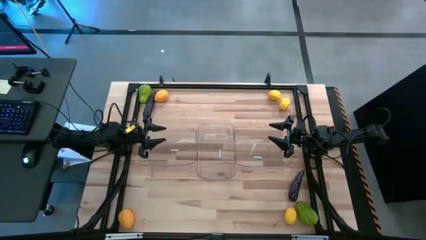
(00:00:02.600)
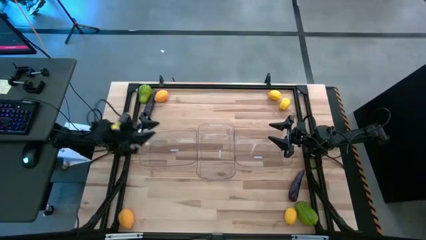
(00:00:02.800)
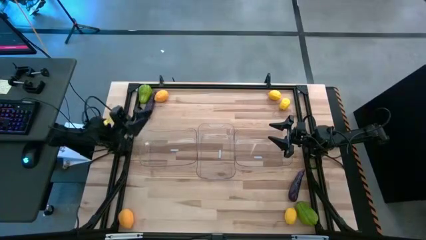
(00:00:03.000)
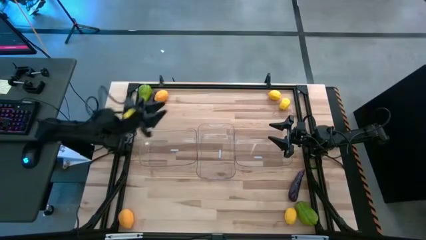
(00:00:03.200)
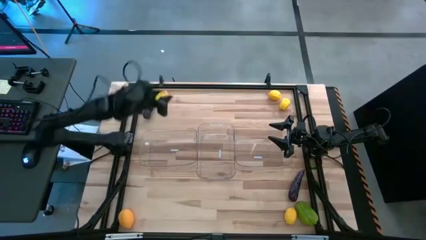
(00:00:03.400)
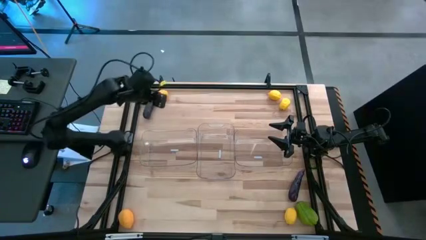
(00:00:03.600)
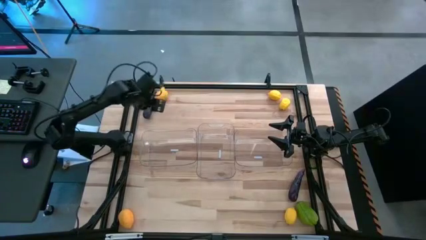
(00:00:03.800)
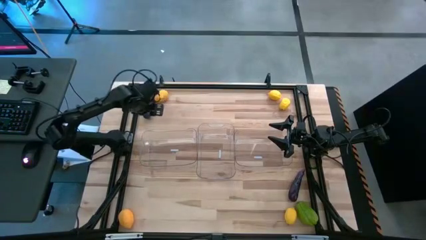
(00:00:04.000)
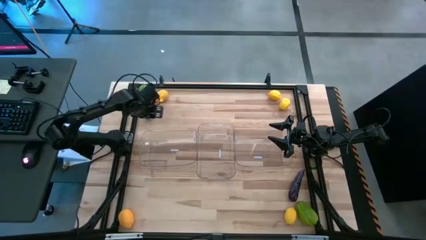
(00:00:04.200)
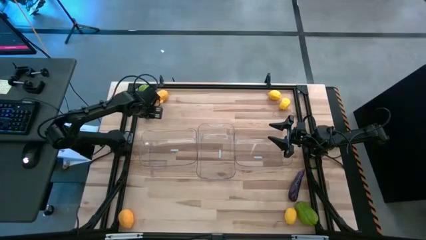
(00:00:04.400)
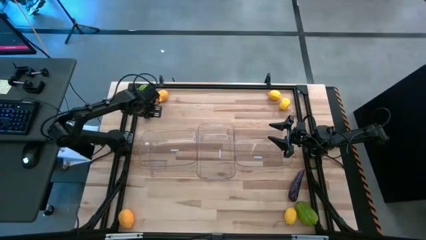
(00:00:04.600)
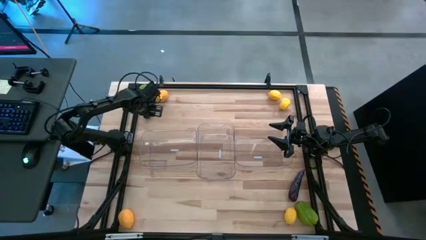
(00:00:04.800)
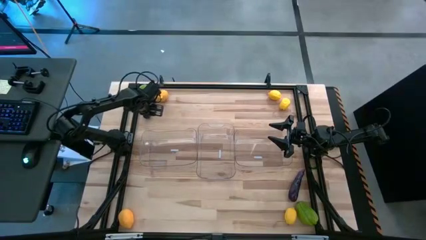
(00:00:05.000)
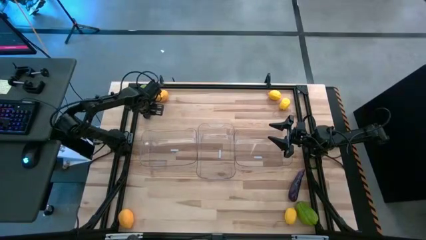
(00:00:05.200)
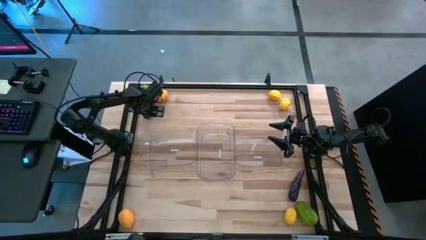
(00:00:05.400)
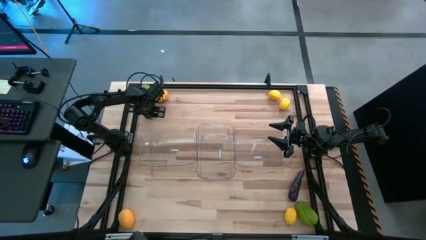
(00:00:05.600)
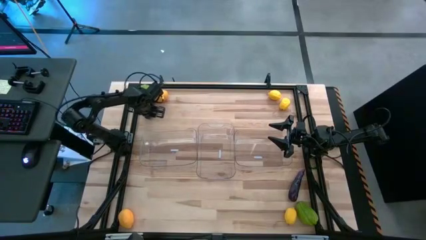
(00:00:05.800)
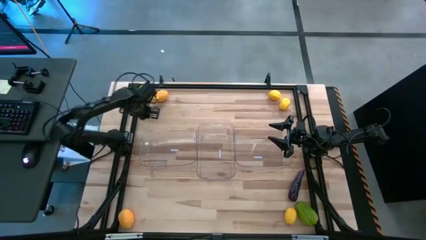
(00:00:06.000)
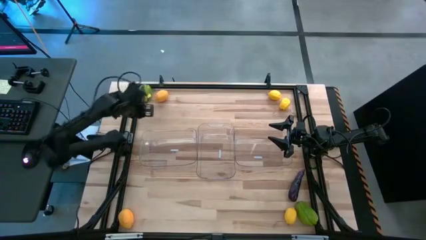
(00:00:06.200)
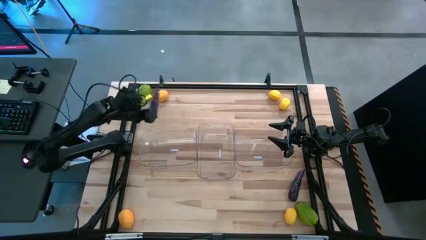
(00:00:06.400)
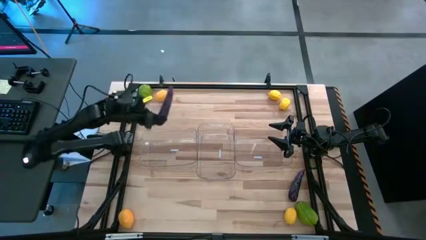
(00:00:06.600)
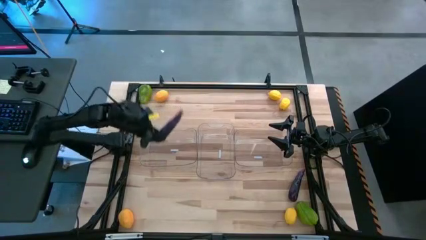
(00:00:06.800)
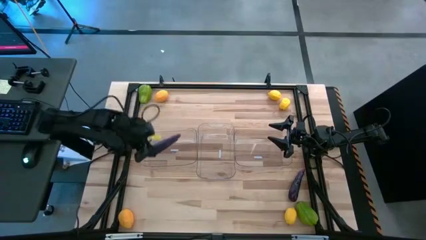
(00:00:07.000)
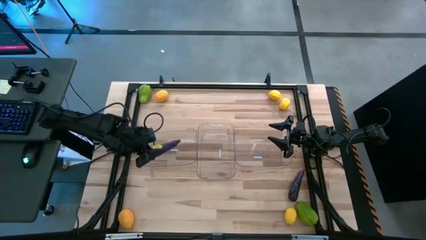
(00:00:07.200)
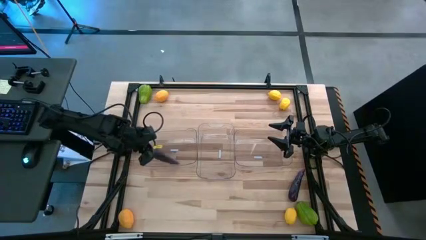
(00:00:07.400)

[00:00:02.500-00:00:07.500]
Task: Sort produce into baskets
Put the eggplant into the left transparent bin

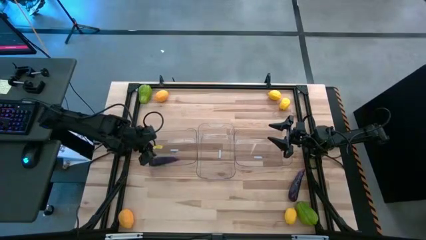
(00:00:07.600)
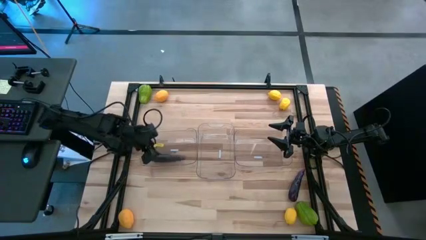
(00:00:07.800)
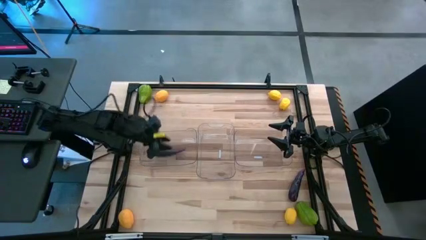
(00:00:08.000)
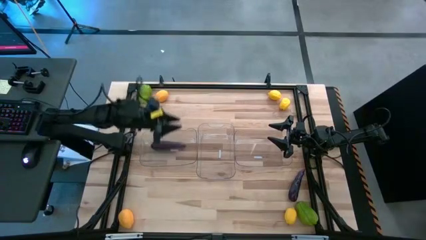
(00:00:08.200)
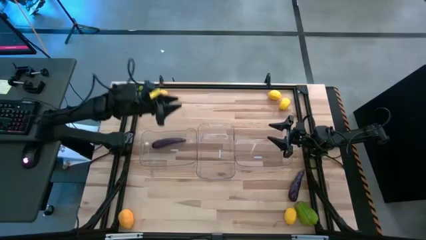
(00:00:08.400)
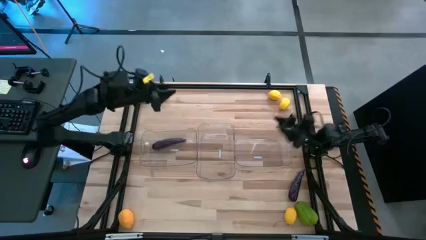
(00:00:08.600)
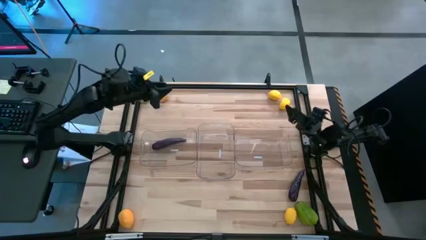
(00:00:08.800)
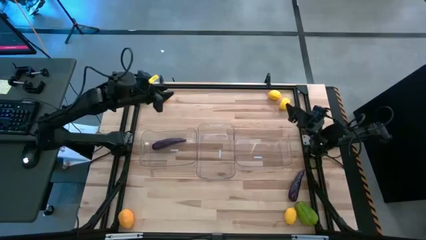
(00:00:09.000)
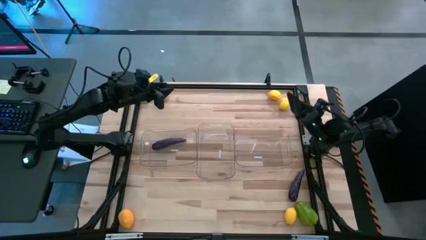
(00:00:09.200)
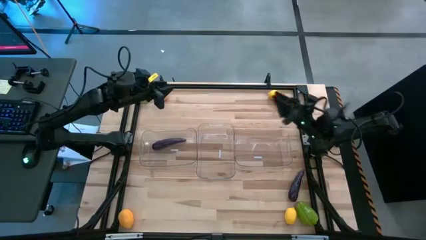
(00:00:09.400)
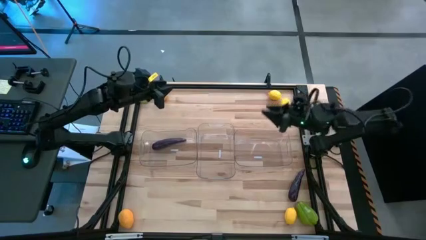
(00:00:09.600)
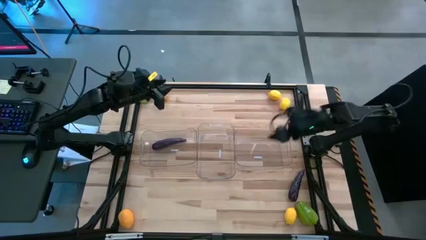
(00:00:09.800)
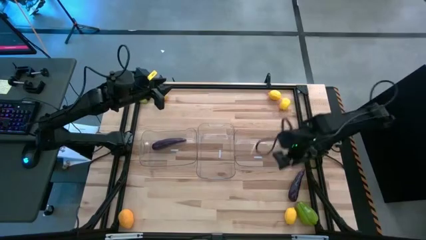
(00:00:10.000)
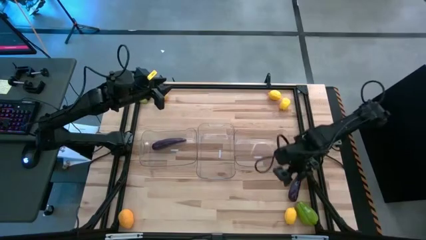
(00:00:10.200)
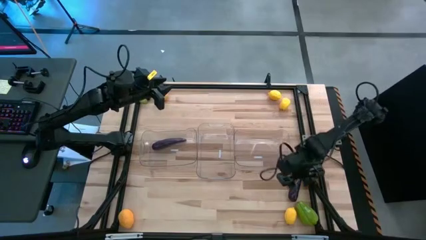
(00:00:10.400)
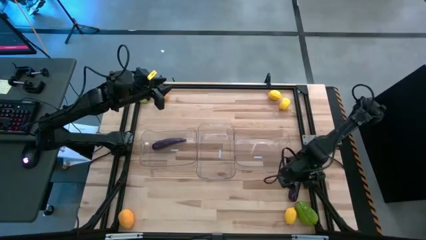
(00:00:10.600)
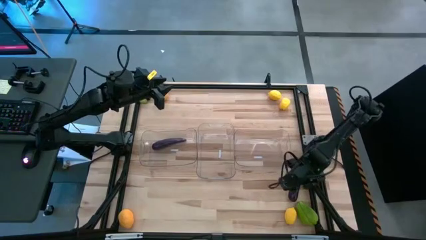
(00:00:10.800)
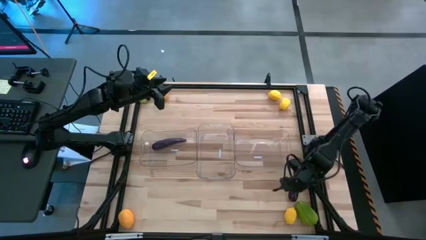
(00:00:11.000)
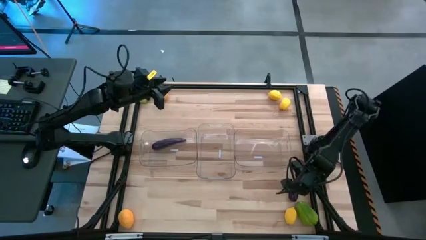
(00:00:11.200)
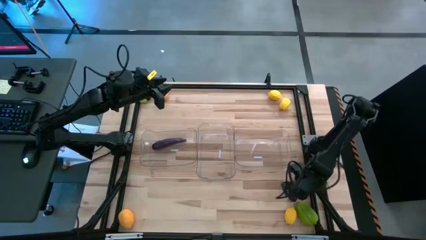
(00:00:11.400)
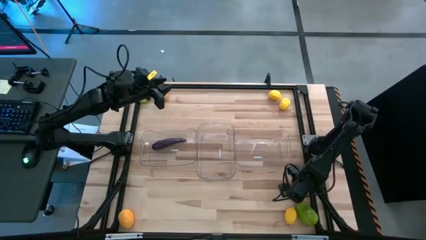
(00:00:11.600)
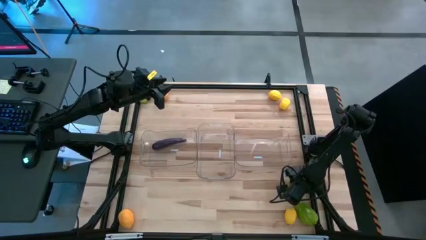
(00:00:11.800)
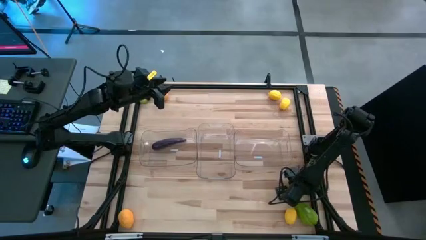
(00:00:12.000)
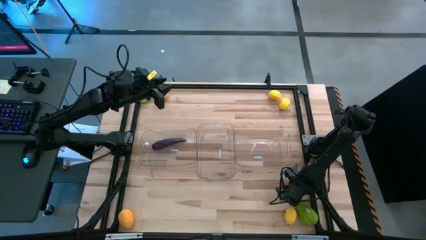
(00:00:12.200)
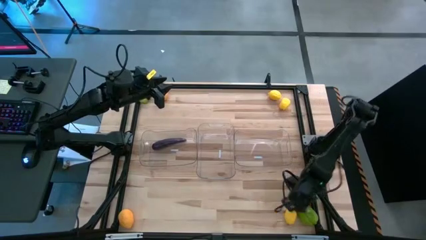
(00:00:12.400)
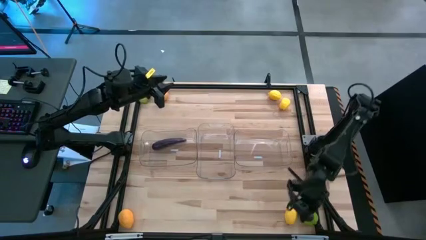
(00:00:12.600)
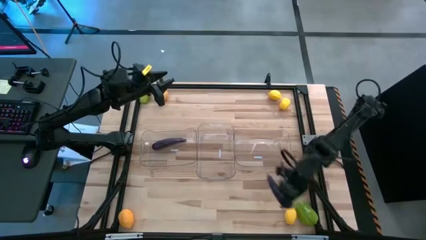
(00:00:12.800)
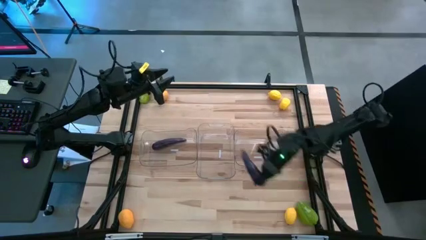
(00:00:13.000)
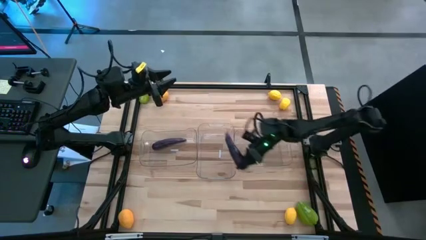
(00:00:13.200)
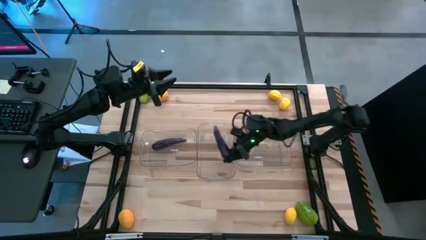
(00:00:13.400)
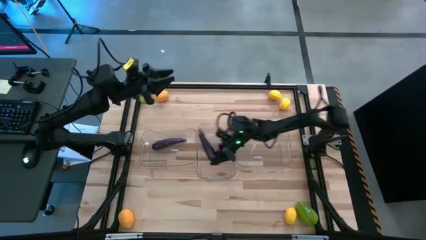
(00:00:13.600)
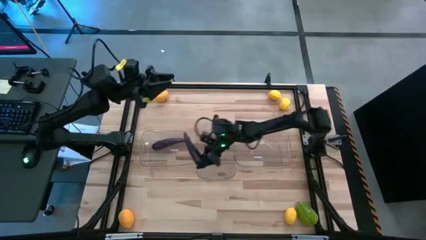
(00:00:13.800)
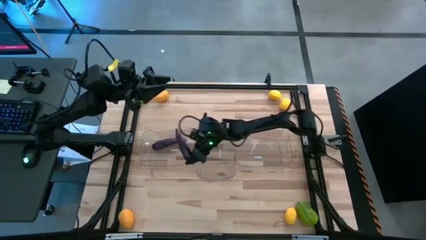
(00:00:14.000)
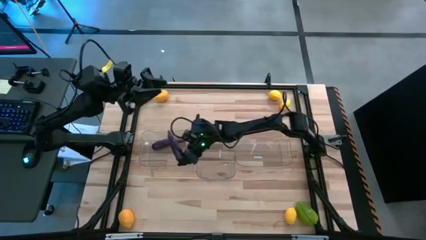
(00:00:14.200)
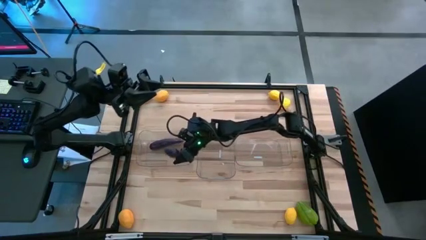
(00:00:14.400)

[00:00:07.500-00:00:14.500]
Put the eggplant into the left transparent bin

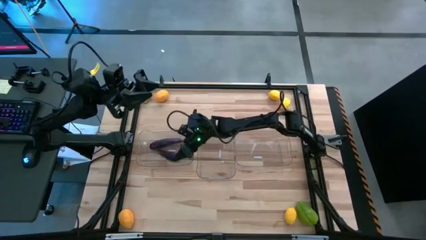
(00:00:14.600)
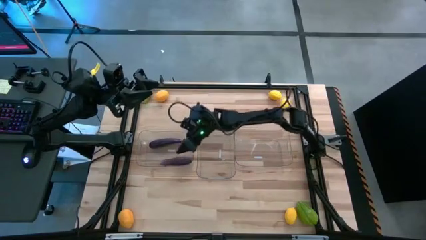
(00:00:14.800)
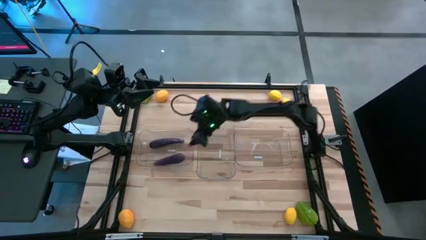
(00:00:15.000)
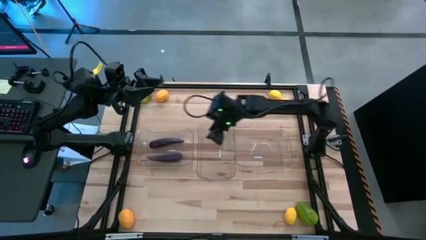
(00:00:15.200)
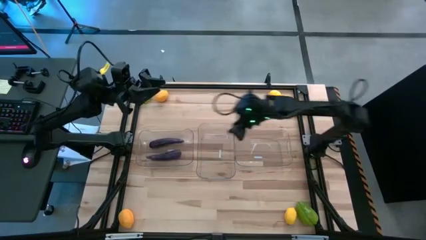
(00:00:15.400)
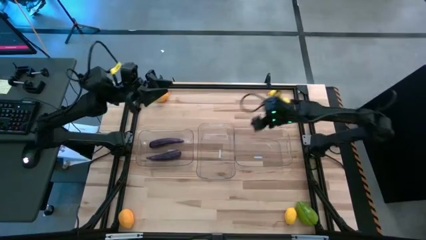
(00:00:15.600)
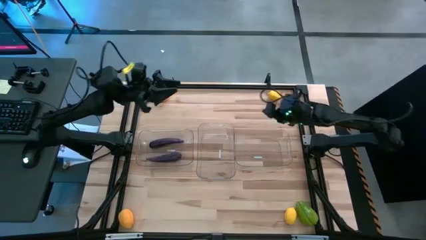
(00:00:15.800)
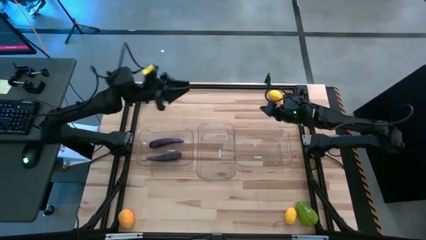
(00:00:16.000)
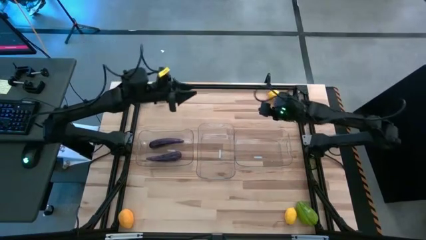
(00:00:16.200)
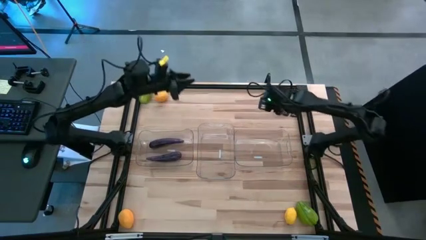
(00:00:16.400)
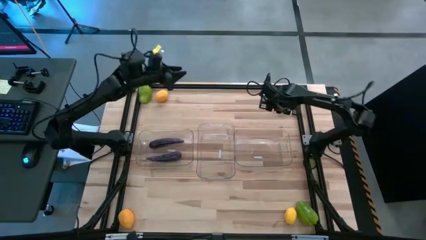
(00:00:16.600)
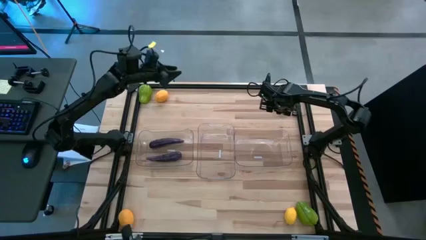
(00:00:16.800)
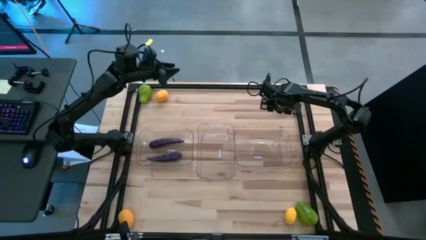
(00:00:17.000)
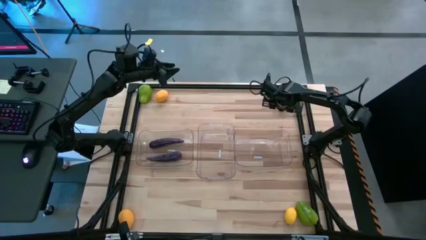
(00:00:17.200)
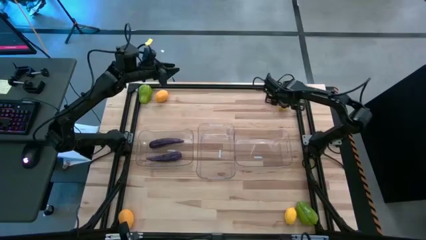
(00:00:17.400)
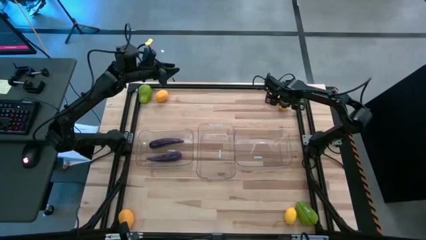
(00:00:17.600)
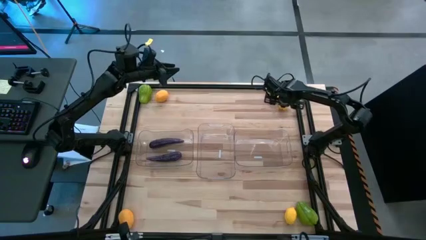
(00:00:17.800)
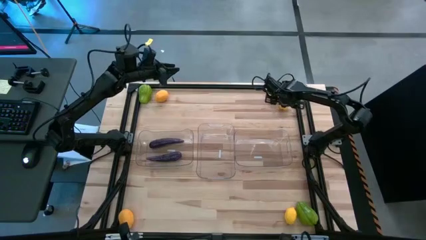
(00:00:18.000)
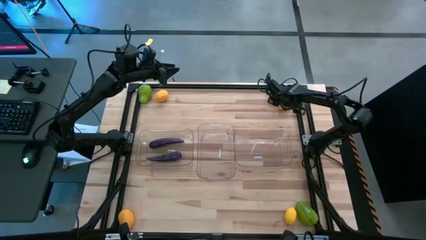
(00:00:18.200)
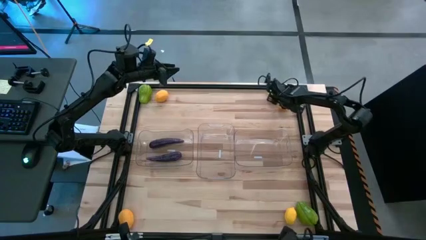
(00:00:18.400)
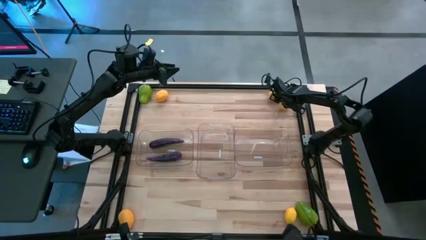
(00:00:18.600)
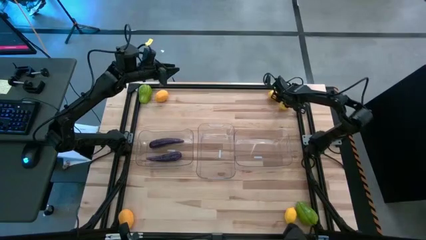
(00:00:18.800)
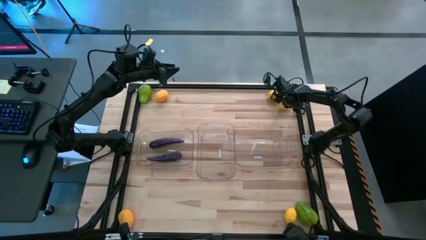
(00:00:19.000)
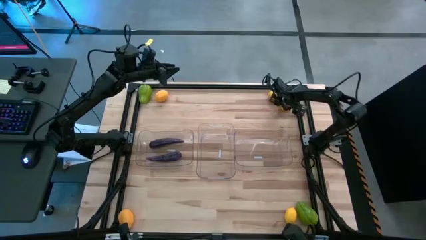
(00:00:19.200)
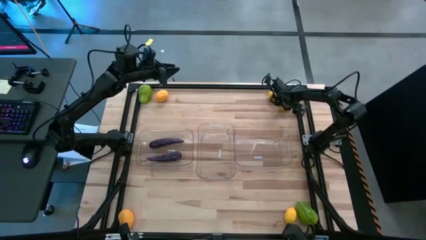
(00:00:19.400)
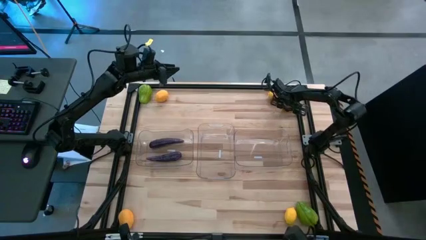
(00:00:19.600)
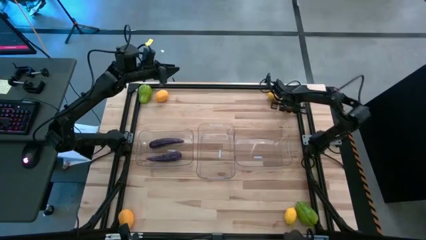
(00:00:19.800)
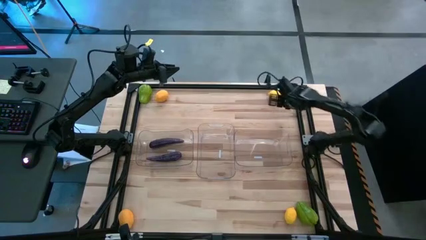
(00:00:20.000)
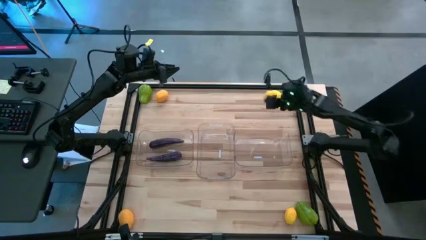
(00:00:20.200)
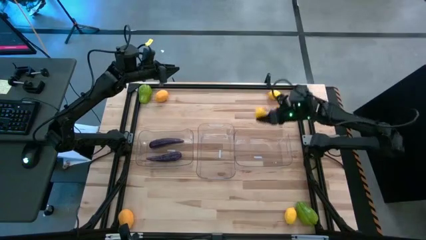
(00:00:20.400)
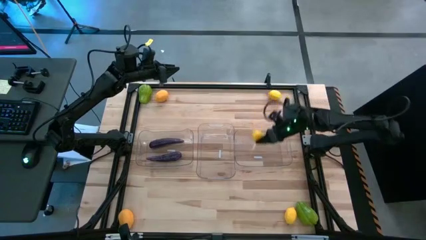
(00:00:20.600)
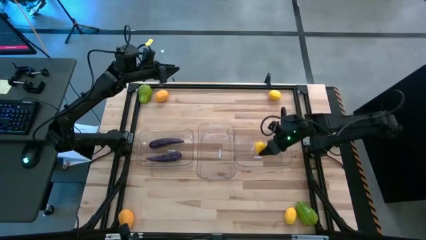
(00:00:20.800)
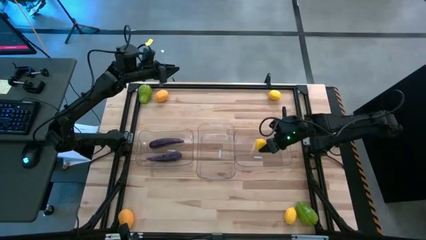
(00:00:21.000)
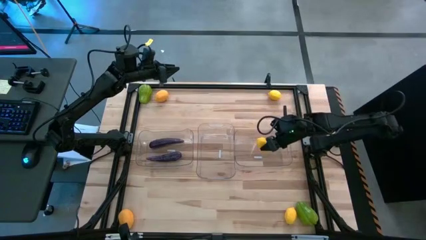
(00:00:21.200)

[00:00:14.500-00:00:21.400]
Put the lemon into the right transparent bin
